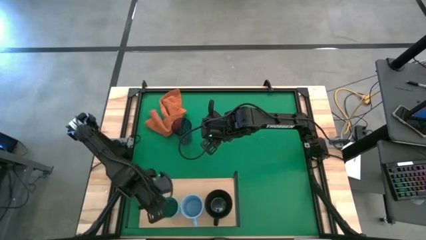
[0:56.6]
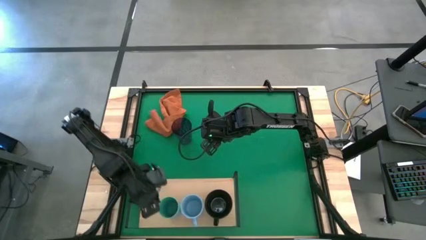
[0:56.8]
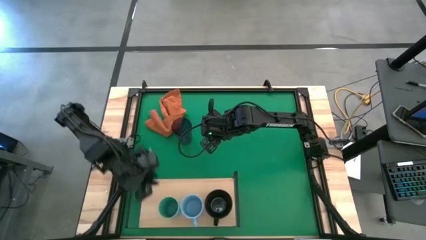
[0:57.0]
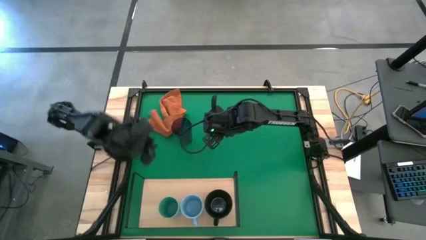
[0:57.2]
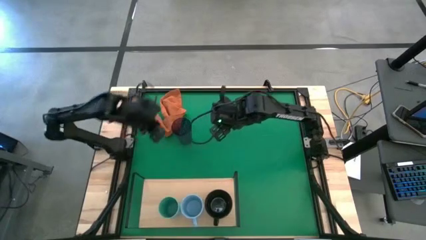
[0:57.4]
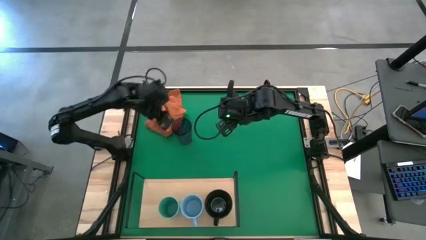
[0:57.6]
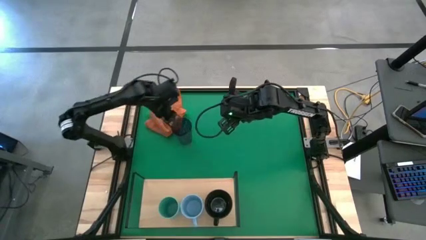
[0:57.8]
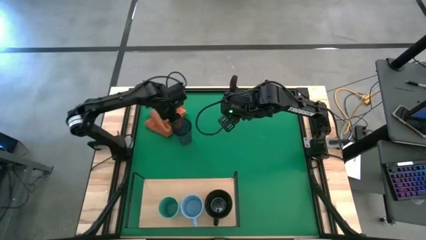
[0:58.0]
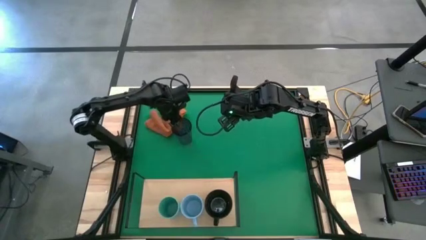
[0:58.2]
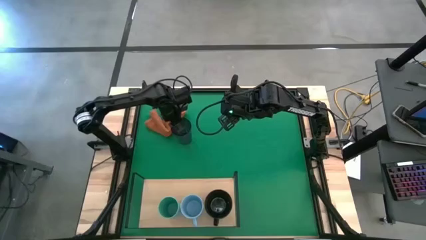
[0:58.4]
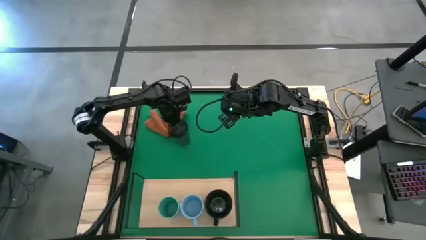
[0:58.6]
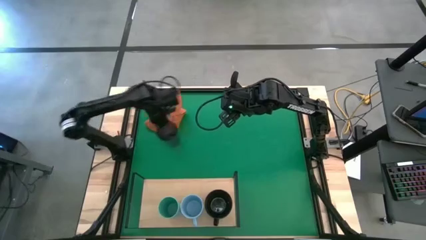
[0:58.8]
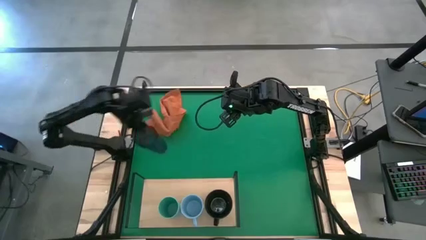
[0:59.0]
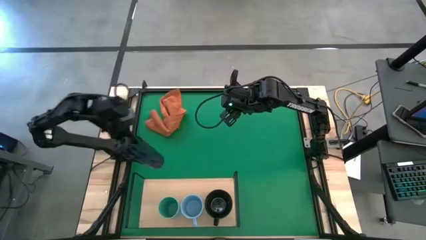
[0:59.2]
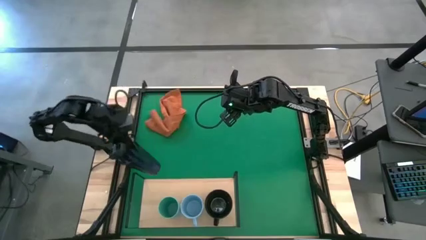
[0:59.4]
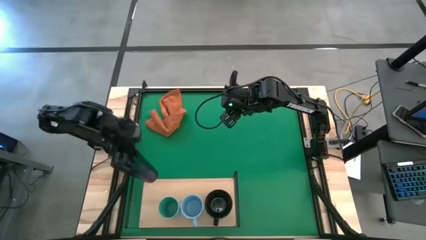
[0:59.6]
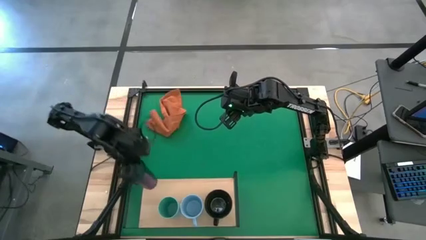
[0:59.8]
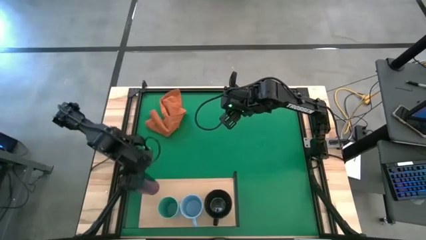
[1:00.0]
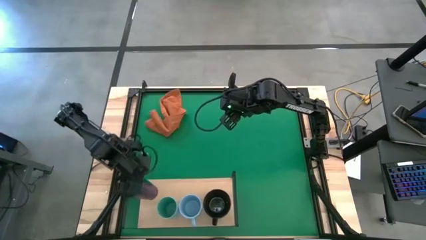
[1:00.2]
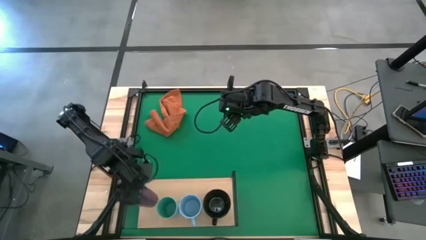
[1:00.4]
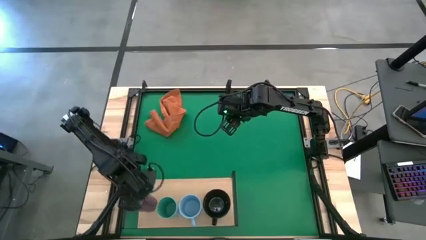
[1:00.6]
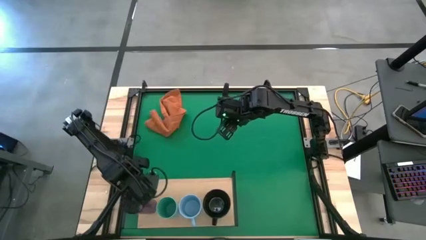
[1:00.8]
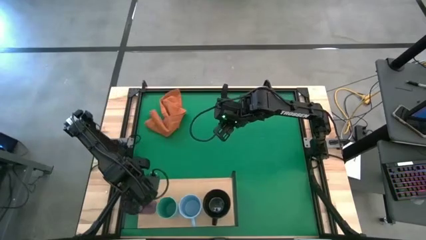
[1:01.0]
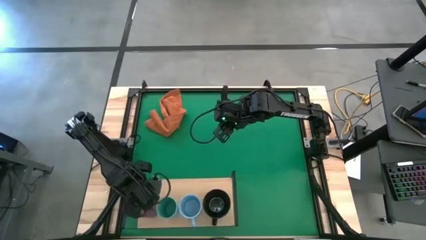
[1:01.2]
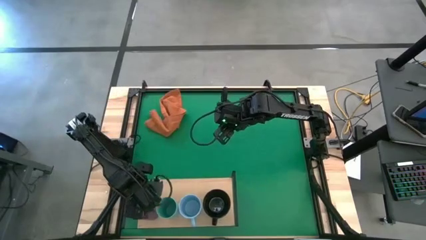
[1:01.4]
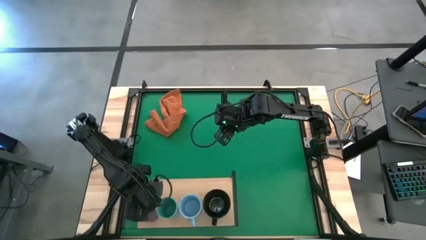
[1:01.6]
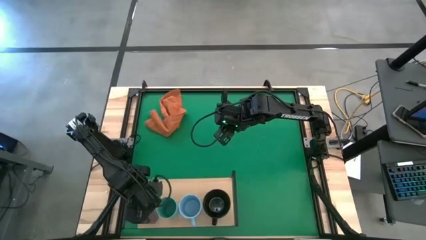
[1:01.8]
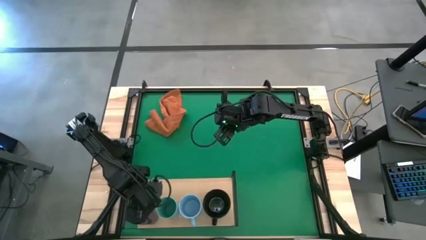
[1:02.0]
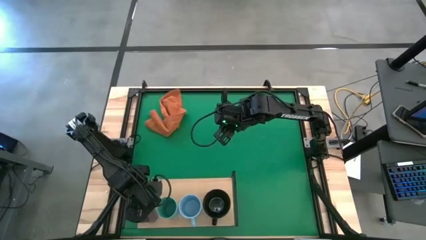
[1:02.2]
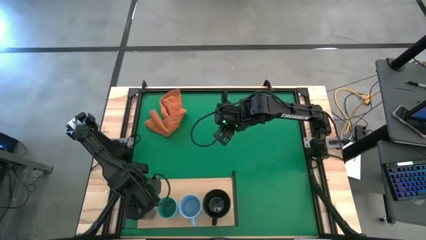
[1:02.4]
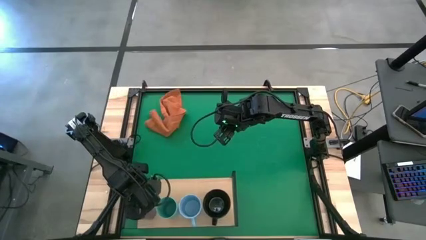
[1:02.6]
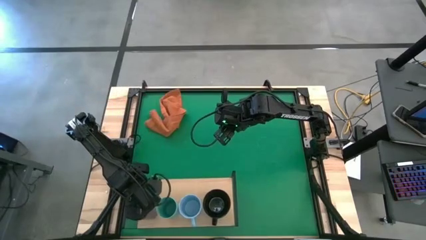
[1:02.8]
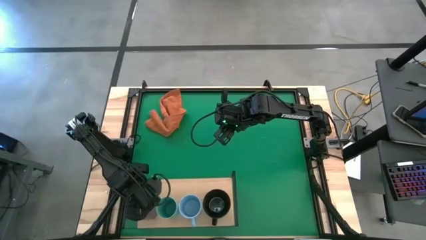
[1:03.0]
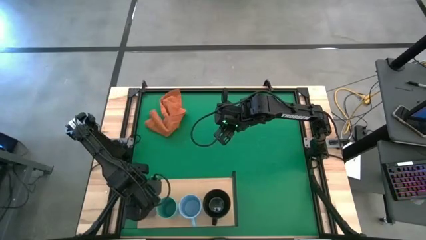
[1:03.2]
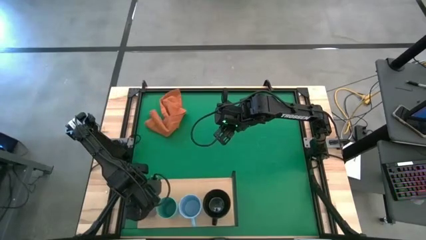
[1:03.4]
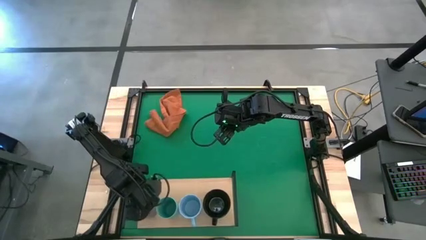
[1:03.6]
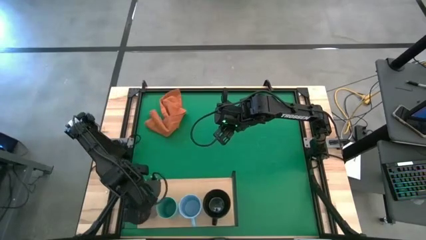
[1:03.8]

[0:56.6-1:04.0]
Task: Stack small to large cups/mugs on shelf
Put the purple cup on the shelf

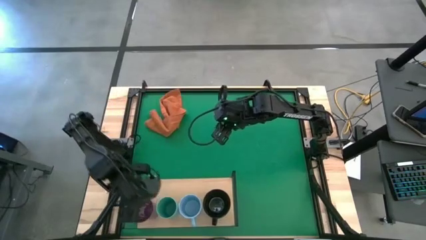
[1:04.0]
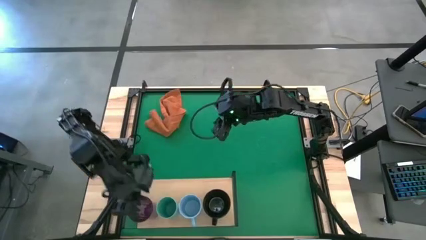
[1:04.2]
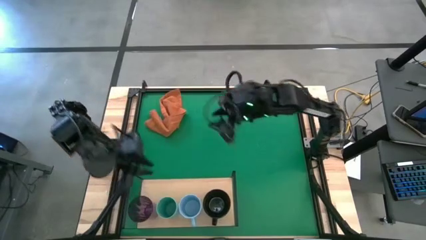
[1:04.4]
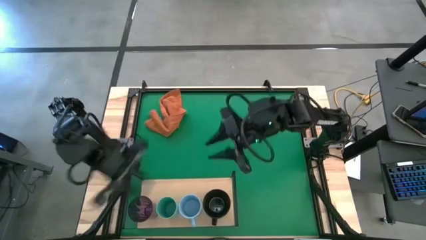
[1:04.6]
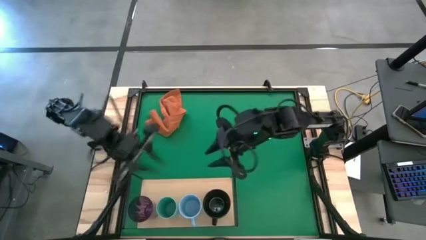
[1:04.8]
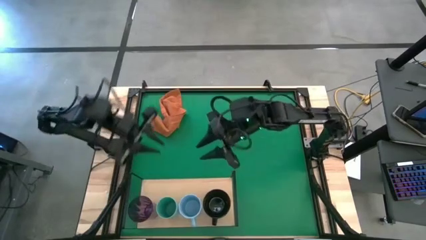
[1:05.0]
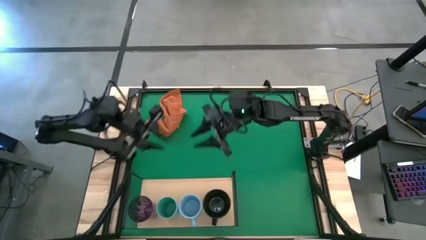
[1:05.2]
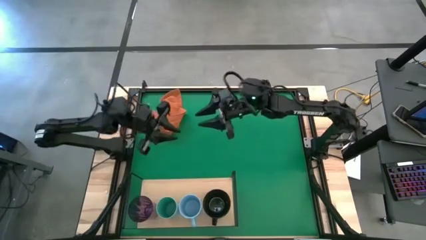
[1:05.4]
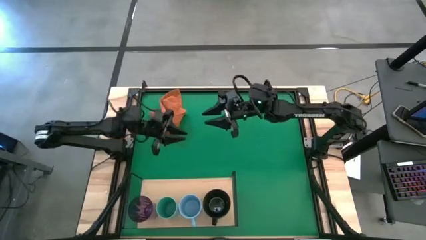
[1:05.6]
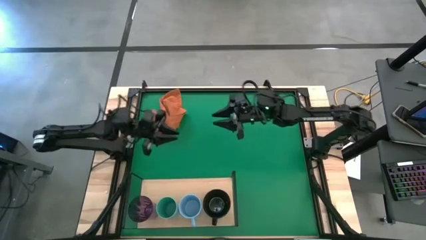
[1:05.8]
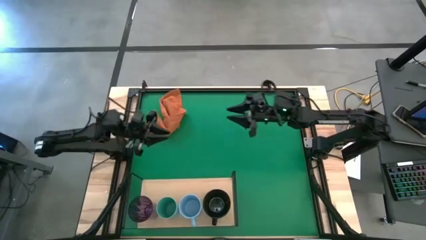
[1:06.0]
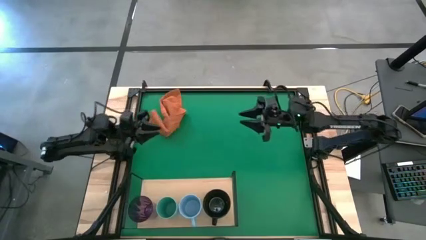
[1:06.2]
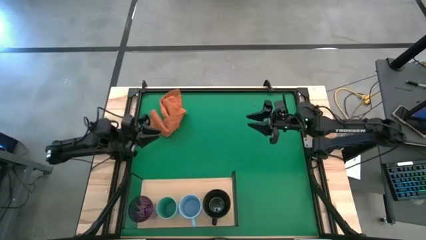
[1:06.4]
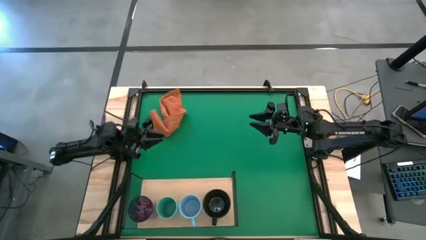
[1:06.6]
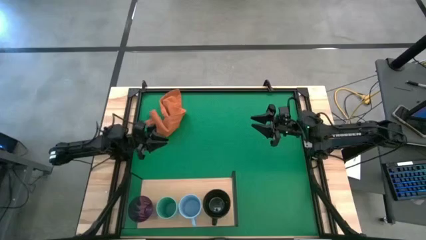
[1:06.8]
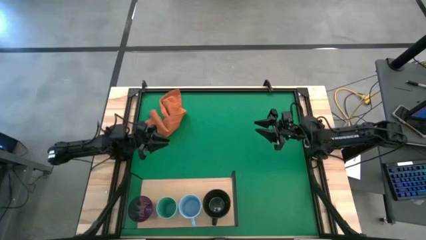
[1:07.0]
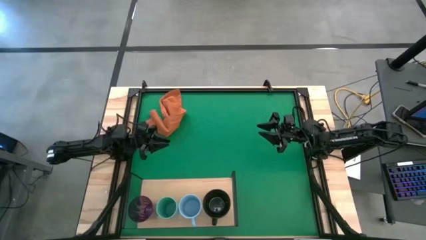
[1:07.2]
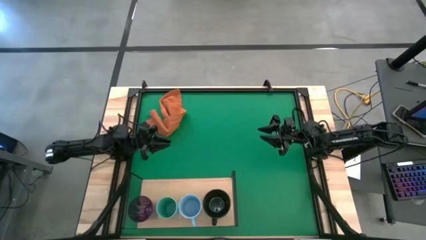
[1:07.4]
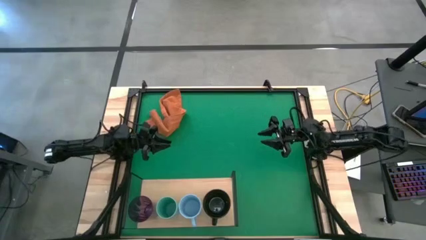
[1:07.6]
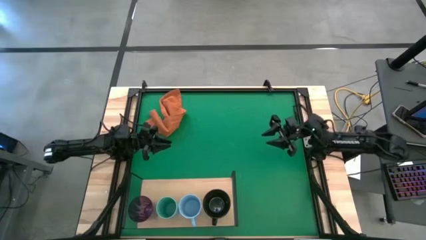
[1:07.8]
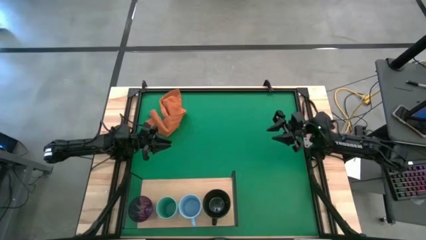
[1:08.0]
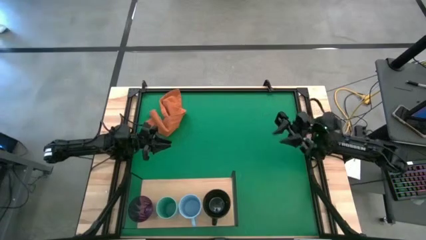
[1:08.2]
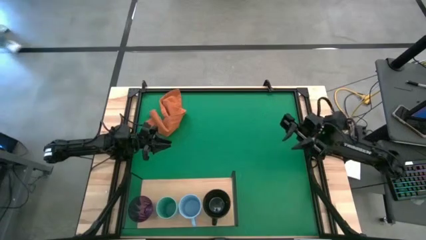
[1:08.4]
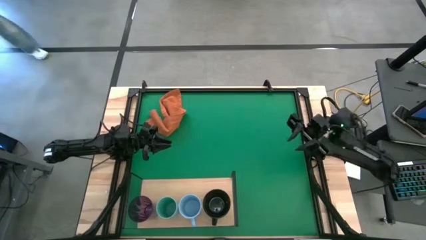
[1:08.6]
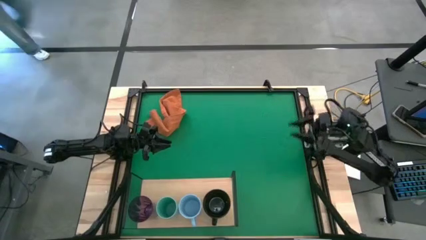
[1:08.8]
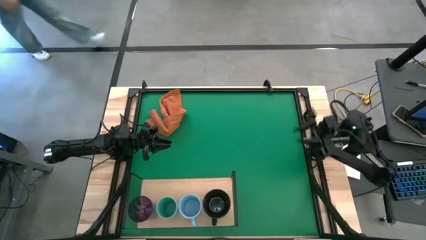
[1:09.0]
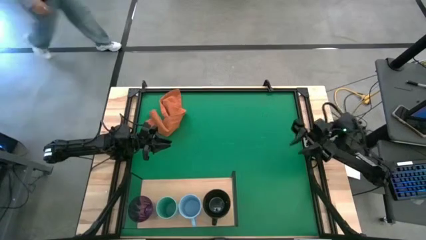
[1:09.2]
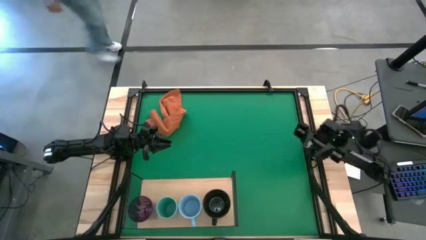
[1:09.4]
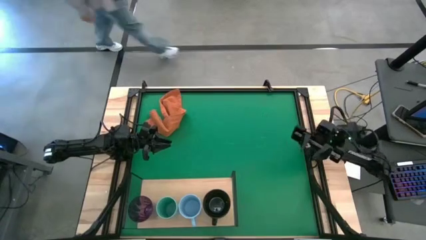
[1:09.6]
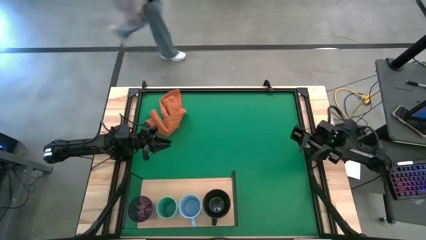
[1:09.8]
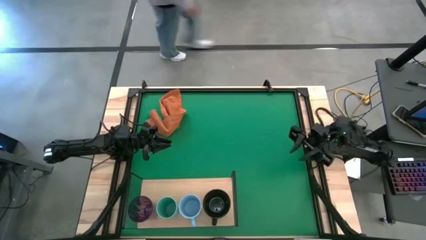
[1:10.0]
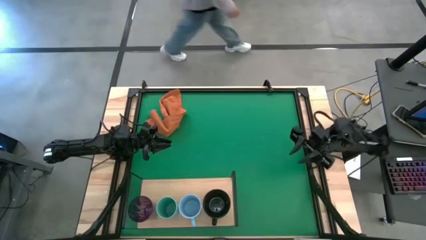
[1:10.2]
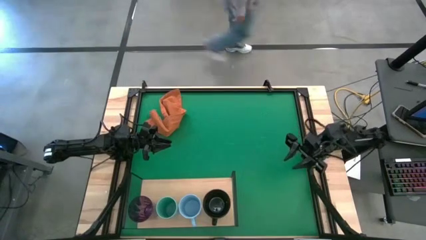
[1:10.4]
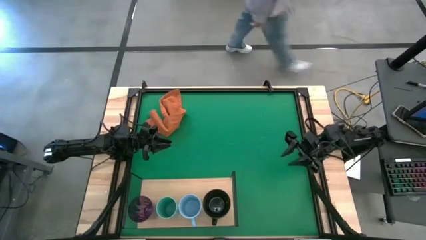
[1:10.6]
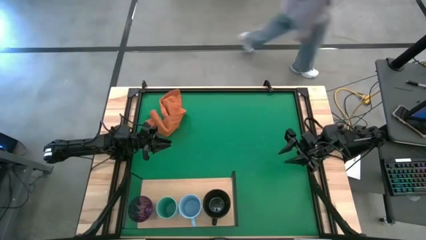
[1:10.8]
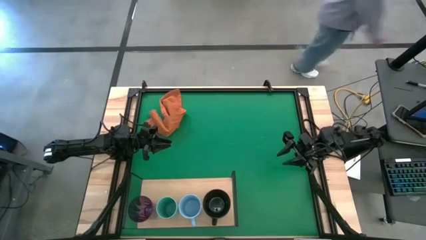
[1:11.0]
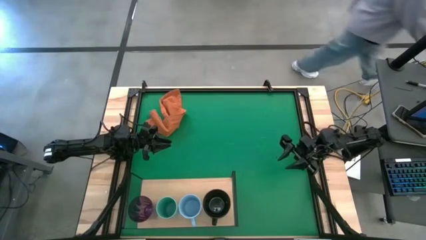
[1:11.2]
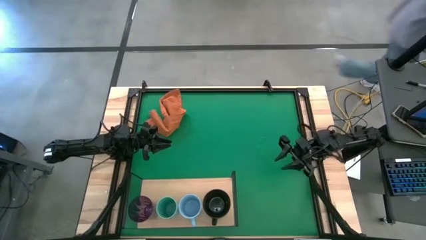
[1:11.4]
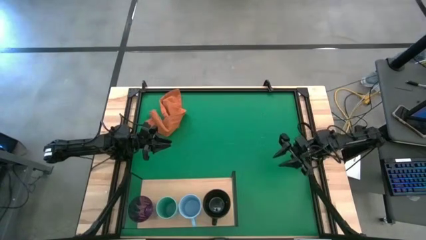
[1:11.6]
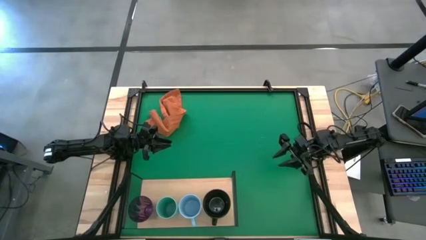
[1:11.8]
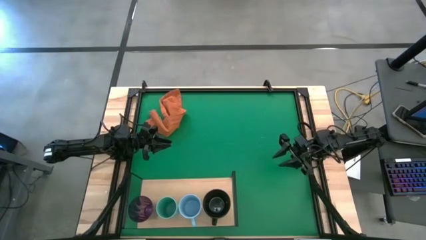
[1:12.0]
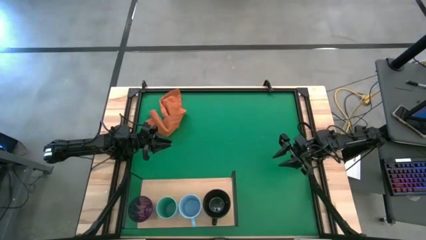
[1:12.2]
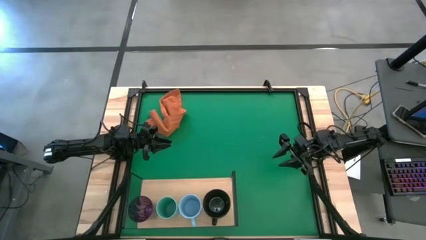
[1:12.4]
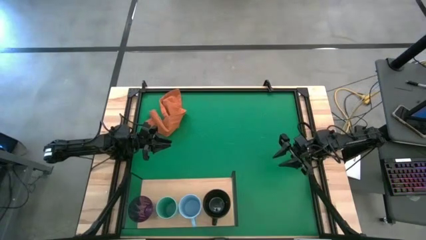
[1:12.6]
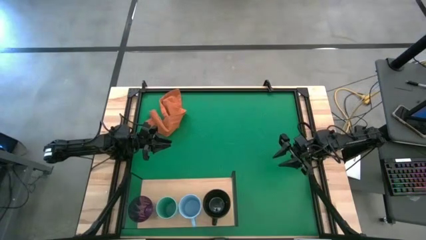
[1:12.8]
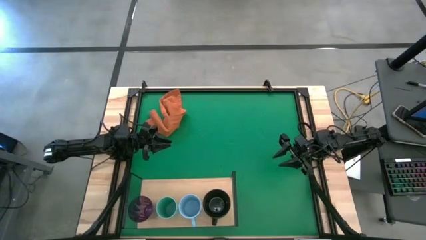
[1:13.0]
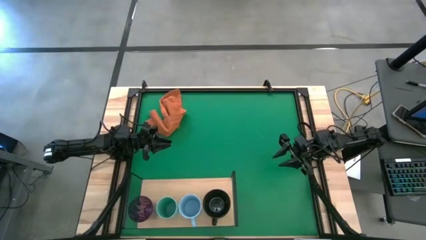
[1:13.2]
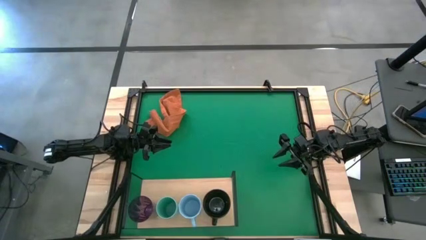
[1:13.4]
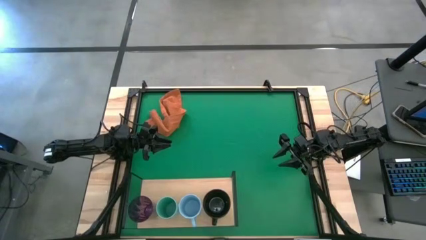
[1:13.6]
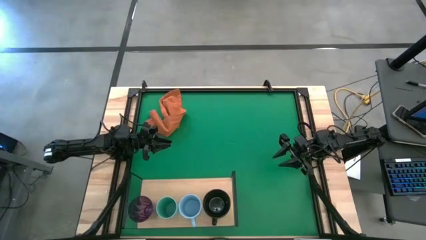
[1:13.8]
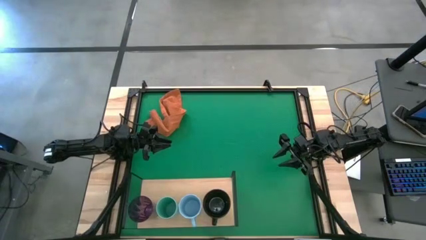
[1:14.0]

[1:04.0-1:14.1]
Return to Home Position
